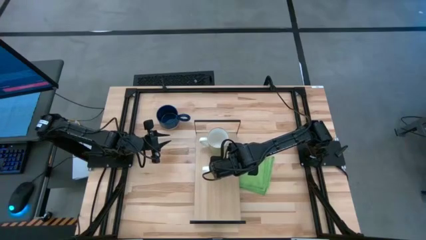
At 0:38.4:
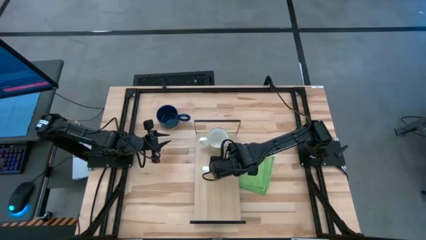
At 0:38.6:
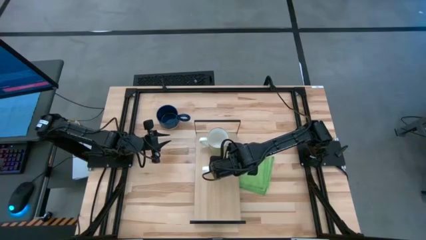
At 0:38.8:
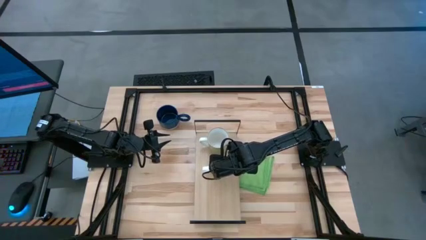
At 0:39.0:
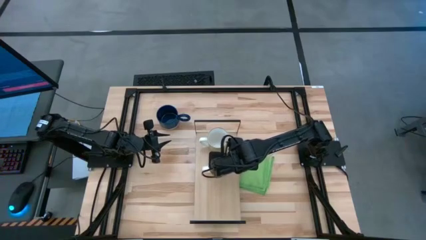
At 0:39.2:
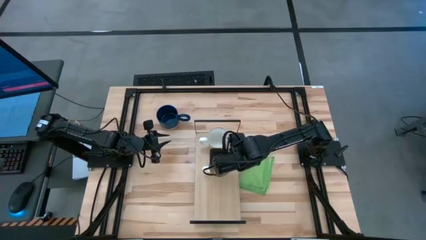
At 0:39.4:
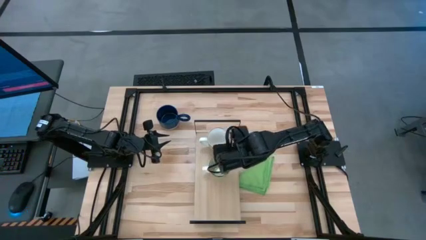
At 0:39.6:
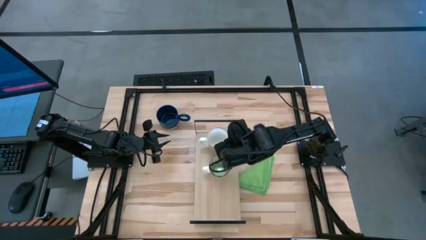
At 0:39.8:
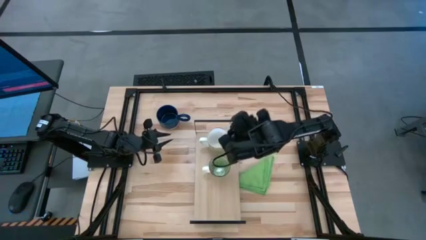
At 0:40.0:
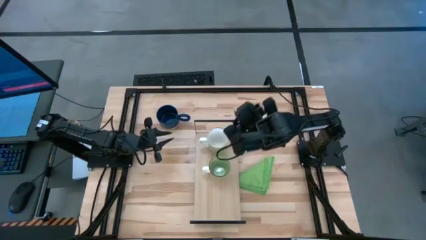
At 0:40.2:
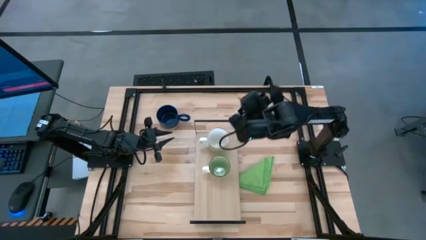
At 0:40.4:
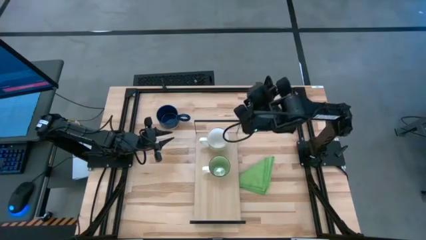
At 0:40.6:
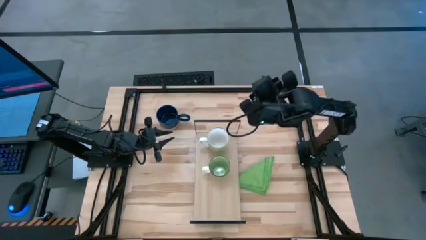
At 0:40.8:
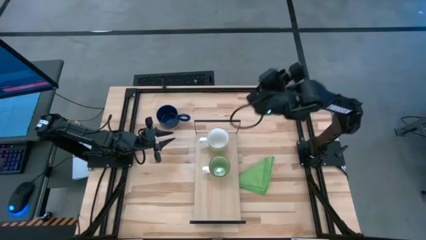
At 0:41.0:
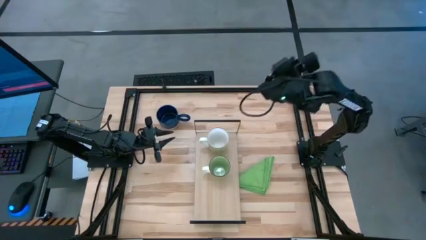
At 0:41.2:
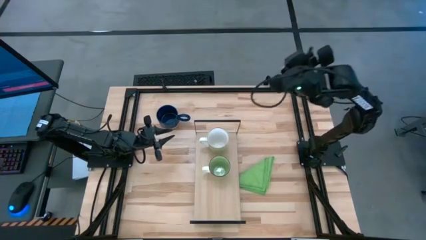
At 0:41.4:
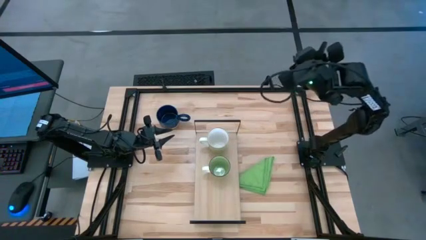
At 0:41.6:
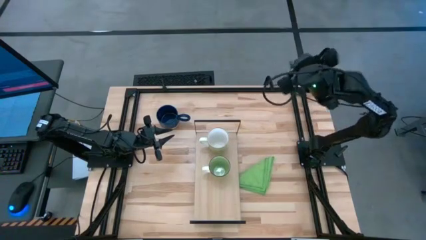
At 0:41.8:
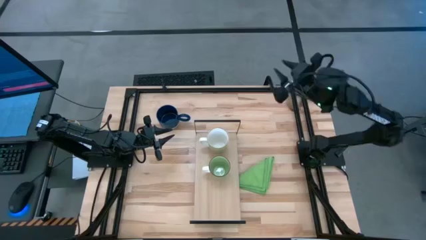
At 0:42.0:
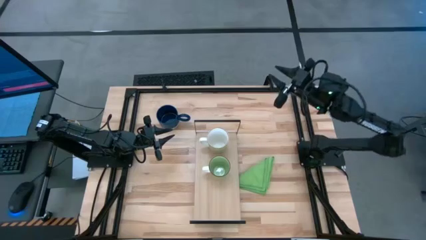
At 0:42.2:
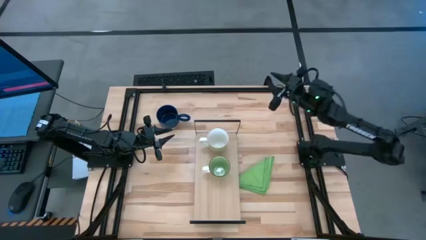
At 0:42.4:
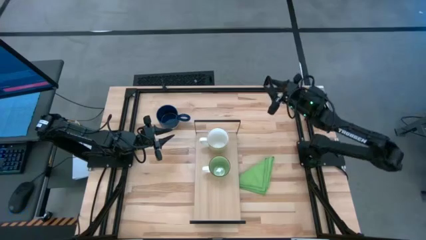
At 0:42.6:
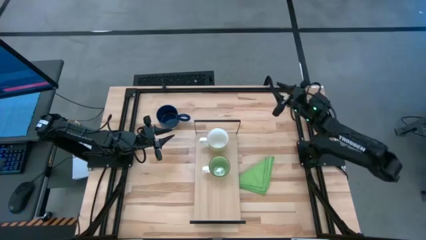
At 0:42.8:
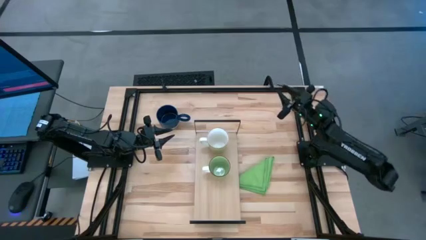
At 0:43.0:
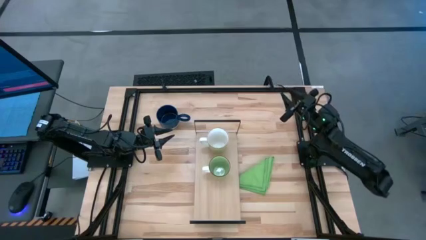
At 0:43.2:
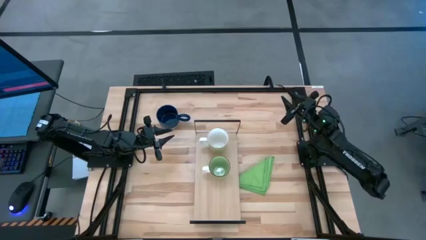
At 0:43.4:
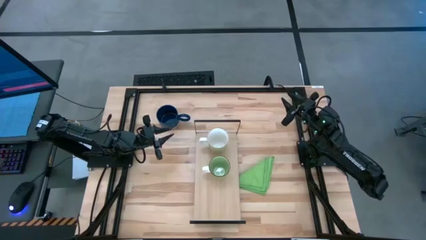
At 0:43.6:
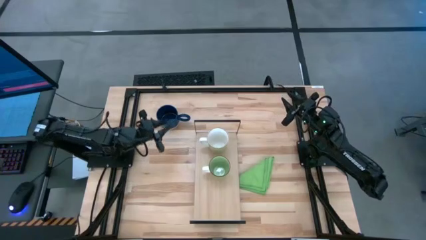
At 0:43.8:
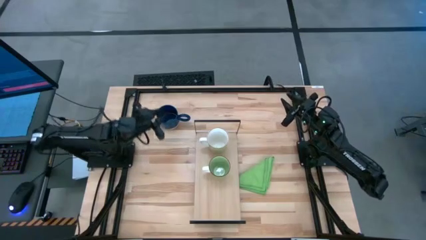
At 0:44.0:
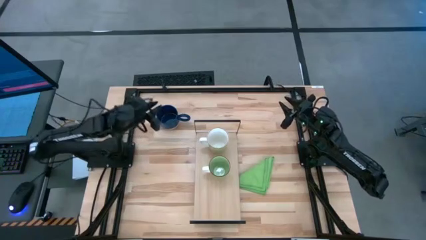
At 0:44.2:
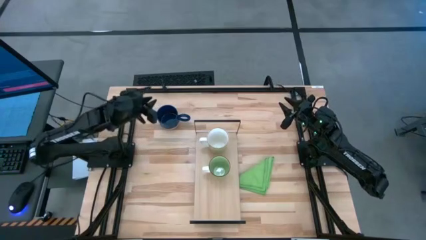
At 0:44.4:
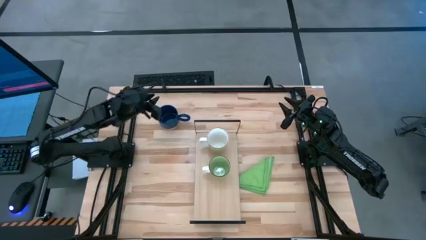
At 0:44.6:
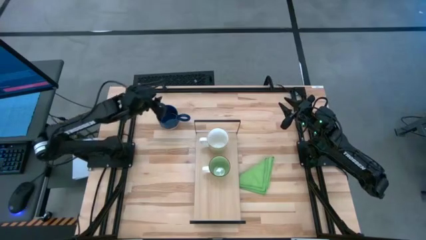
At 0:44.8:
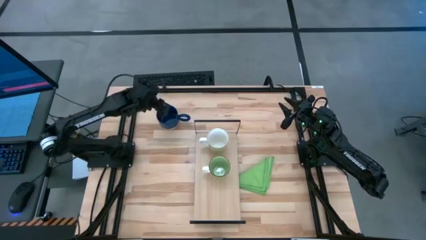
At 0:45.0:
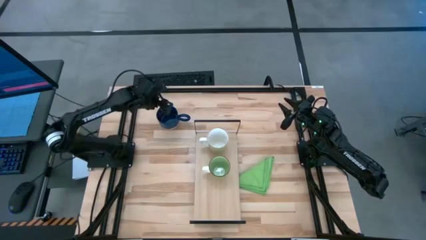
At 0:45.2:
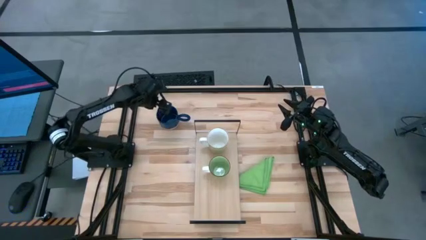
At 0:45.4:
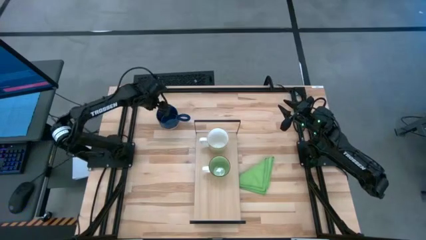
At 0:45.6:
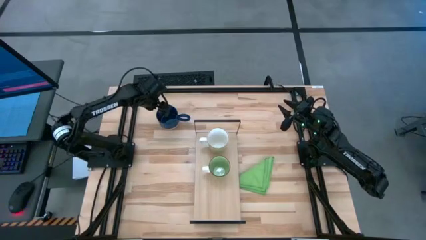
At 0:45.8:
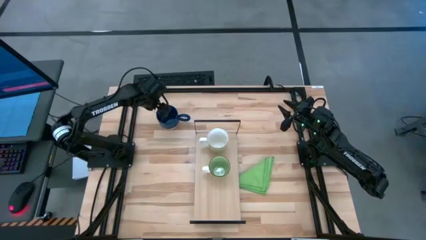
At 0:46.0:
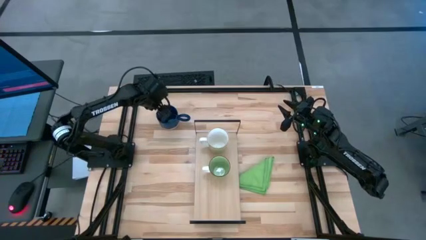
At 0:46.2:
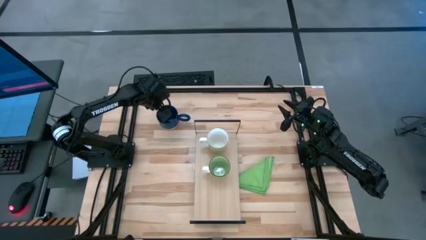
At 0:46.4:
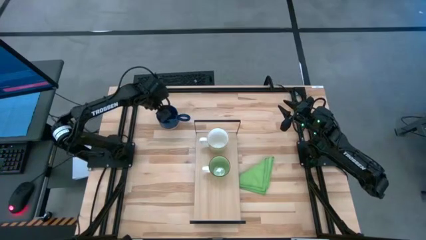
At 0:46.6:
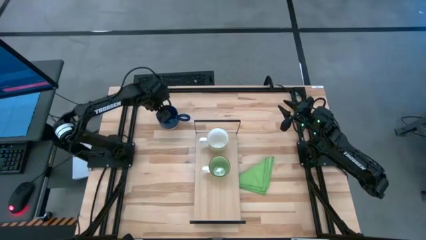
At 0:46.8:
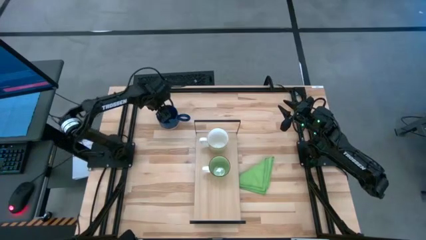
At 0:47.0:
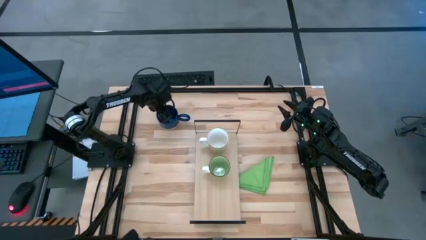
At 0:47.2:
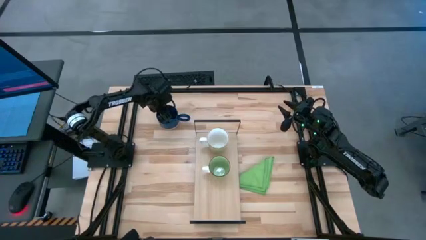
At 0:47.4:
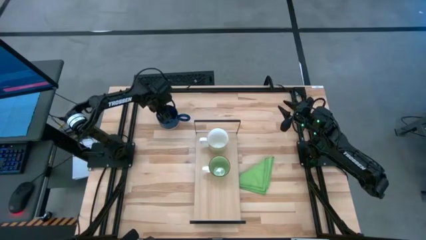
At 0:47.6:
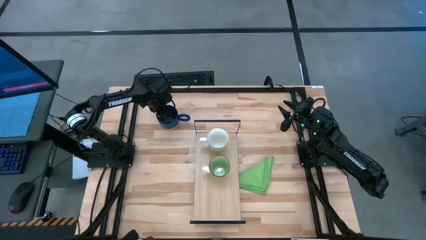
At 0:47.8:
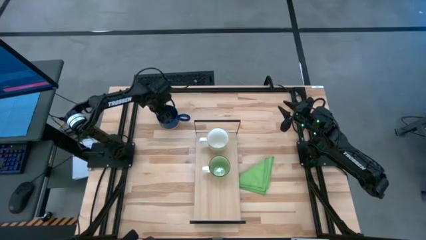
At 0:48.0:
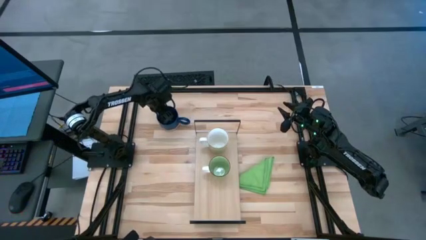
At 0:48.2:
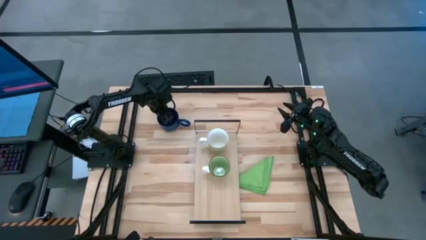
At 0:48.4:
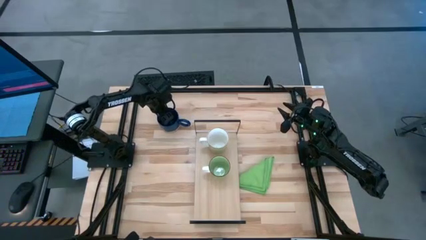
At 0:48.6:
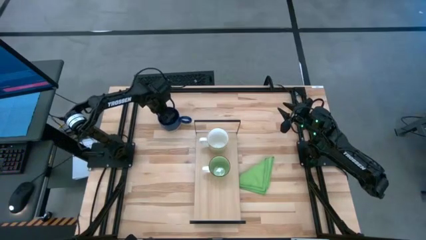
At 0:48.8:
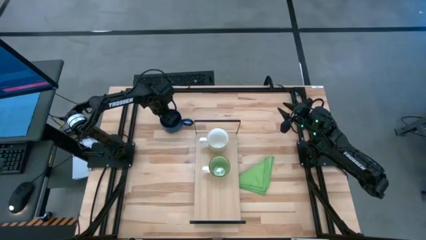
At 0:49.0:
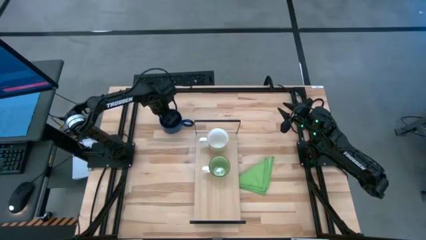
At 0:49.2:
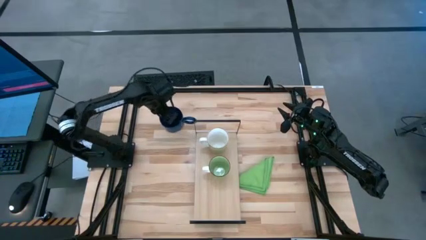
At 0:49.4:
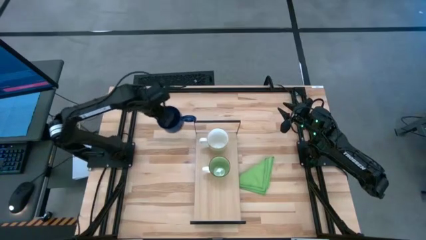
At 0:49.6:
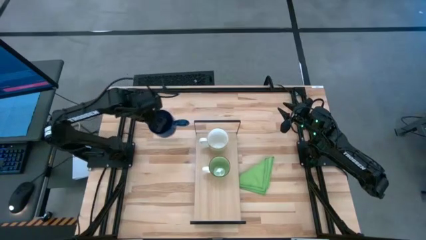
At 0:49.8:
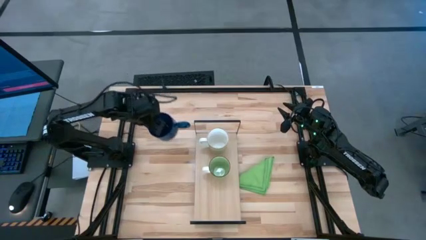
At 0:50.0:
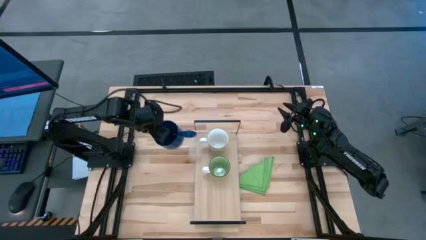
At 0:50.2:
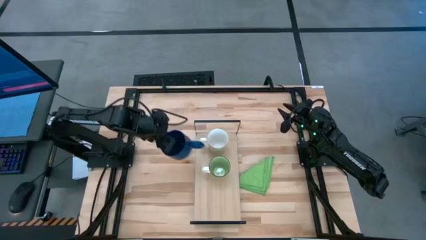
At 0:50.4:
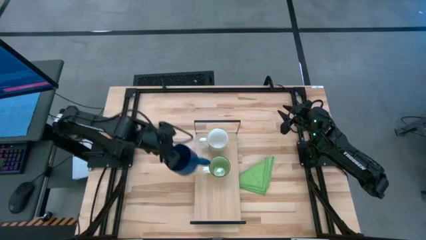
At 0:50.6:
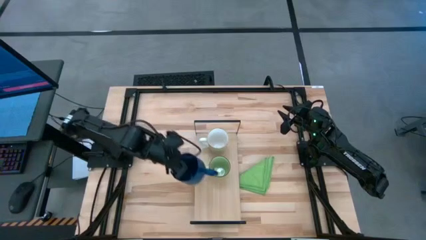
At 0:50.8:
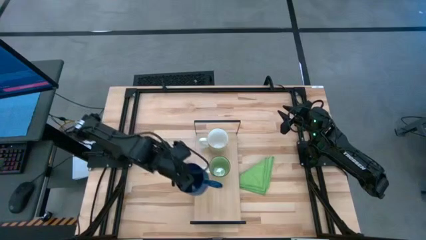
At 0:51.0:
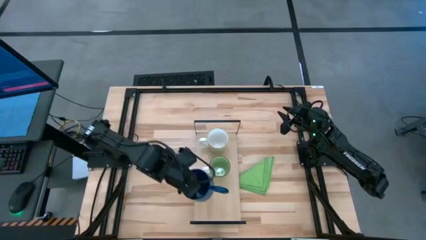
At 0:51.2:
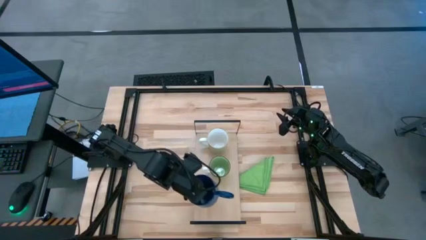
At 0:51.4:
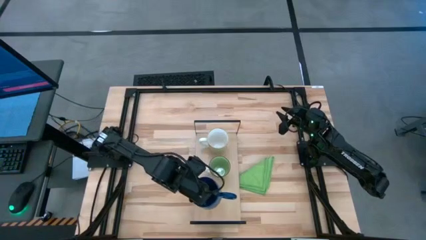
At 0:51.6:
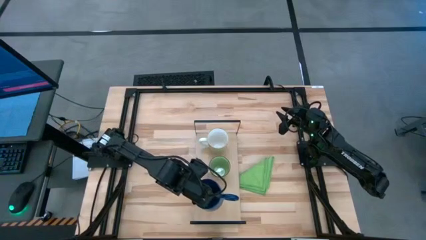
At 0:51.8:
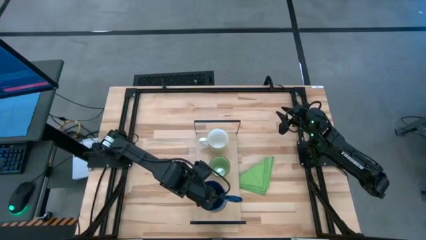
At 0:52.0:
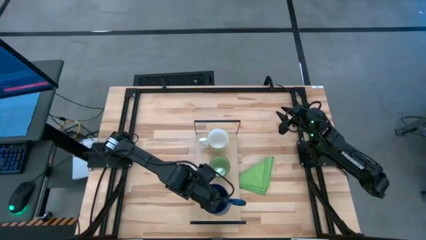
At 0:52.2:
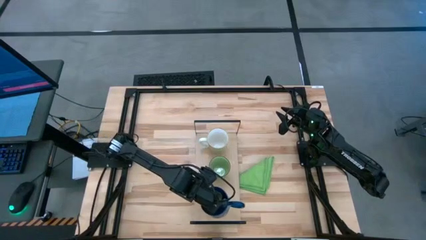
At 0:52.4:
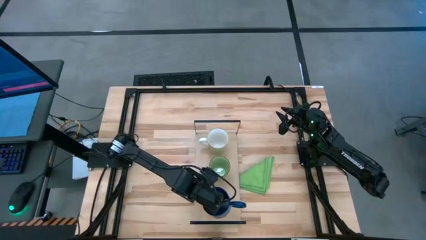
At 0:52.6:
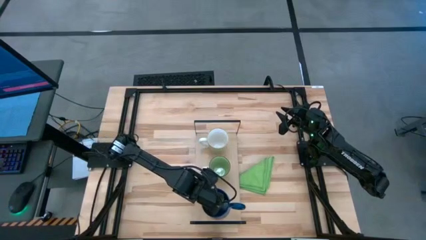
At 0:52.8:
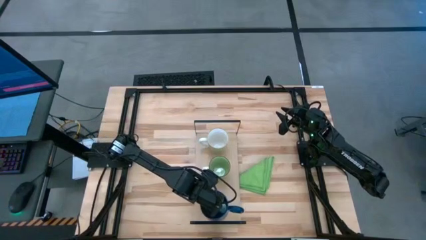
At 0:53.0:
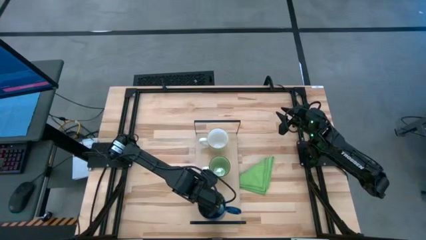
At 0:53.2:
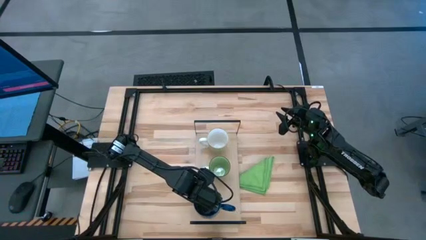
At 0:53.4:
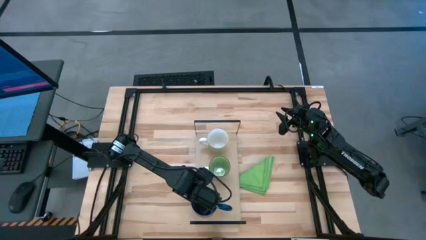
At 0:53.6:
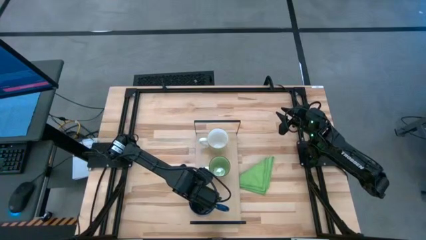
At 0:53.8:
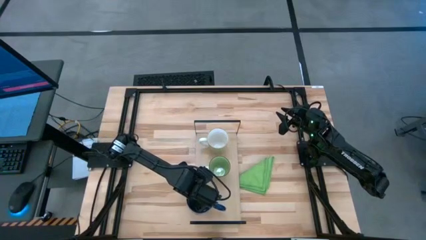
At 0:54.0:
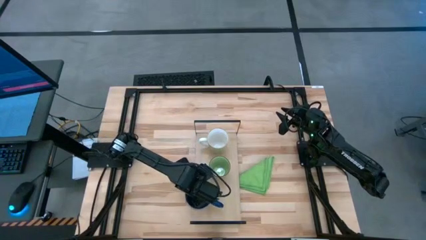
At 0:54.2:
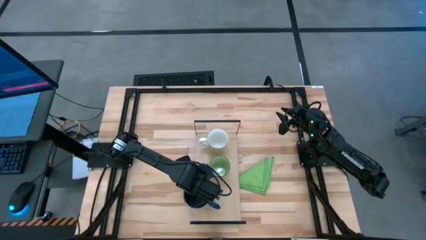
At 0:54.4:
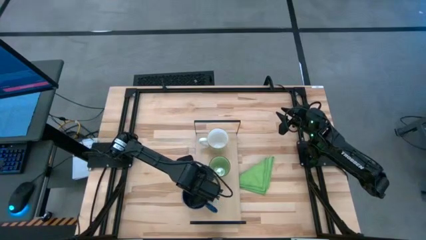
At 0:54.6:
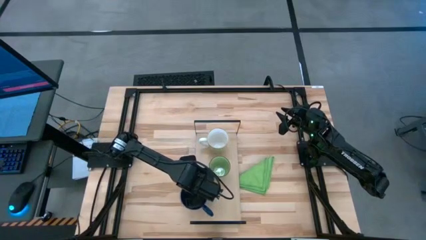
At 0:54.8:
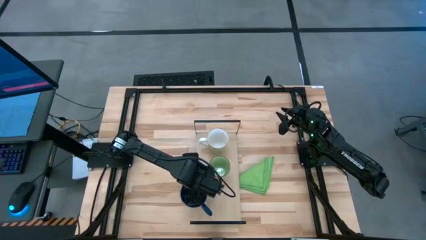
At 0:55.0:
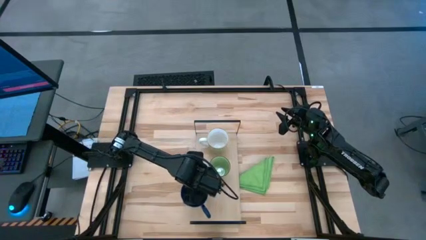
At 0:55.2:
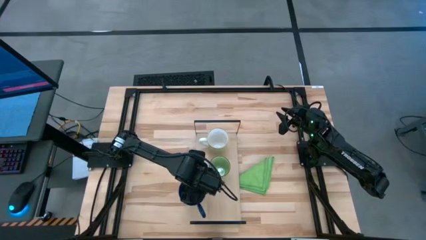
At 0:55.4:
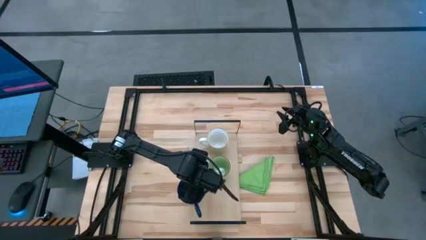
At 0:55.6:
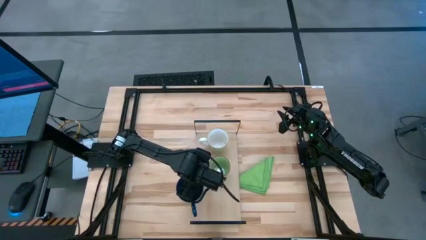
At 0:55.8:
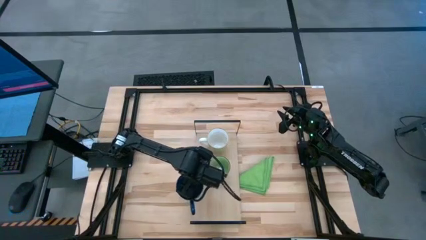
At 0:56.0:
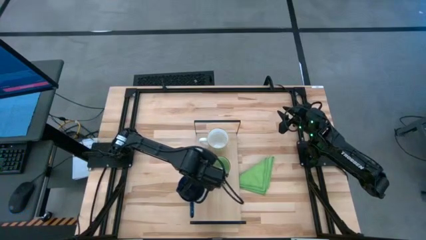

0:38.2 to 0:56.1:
Task: Stack small to large cups/mugs on shelf
Put the blue mug on the shelf
